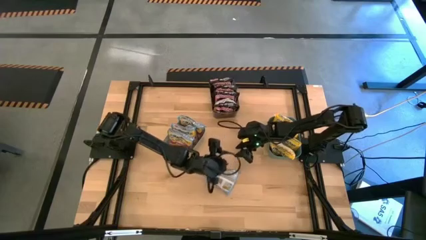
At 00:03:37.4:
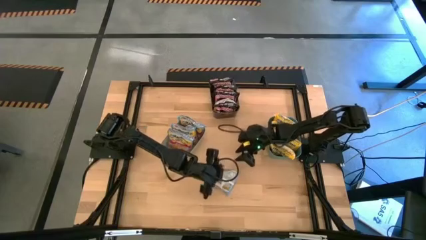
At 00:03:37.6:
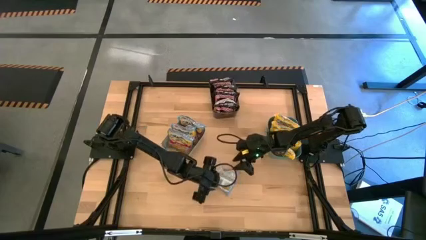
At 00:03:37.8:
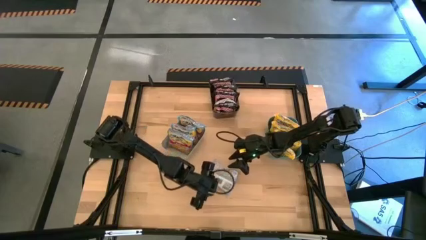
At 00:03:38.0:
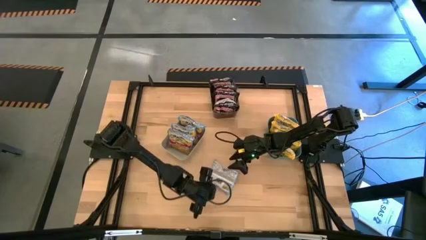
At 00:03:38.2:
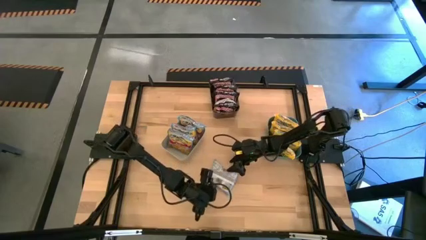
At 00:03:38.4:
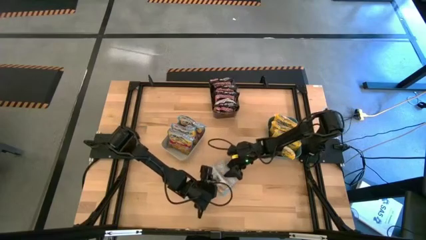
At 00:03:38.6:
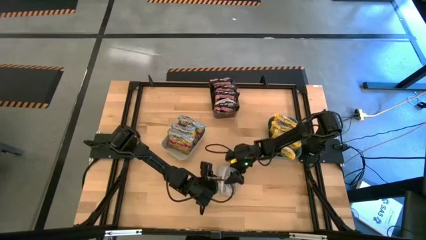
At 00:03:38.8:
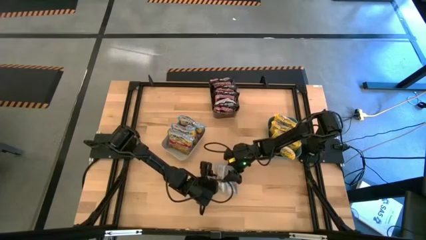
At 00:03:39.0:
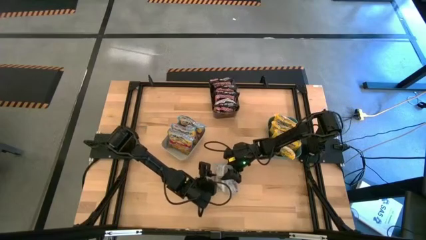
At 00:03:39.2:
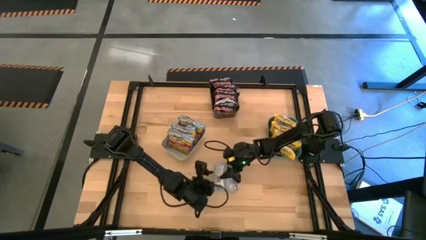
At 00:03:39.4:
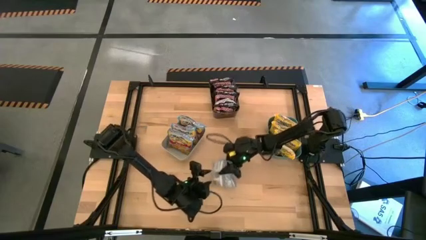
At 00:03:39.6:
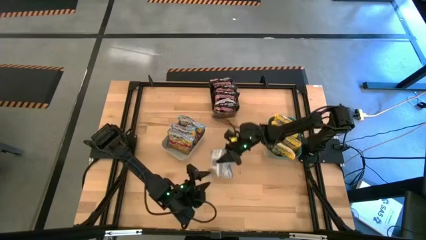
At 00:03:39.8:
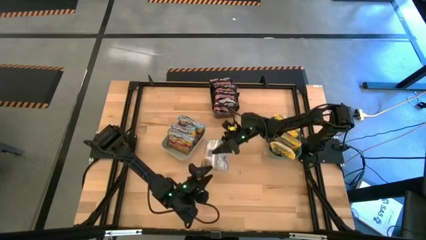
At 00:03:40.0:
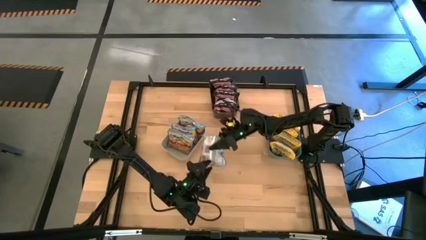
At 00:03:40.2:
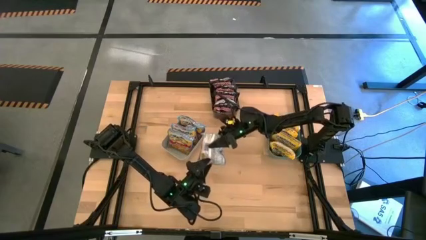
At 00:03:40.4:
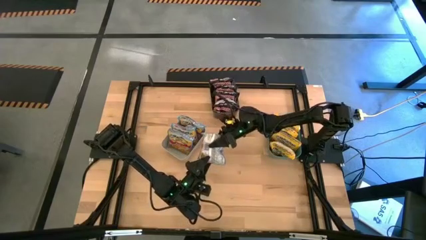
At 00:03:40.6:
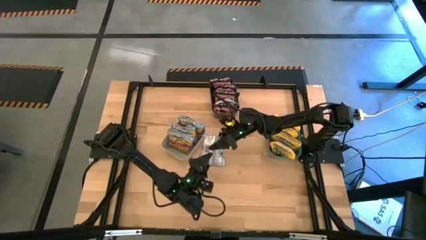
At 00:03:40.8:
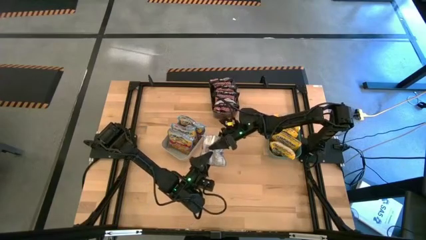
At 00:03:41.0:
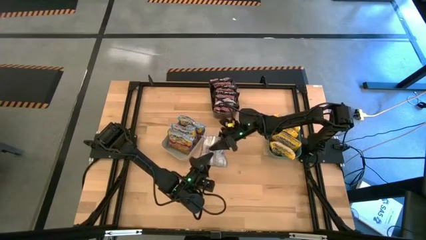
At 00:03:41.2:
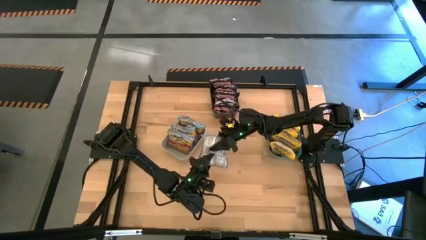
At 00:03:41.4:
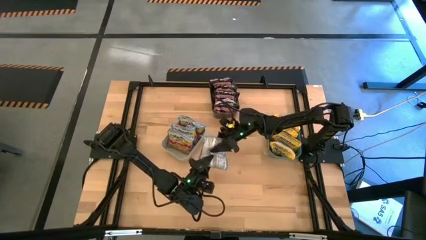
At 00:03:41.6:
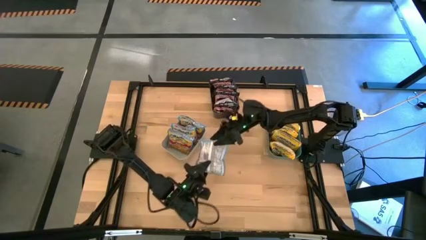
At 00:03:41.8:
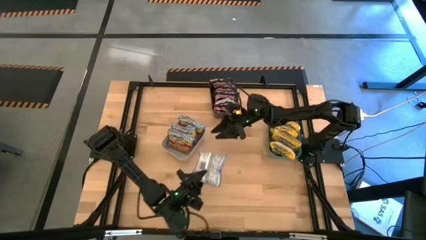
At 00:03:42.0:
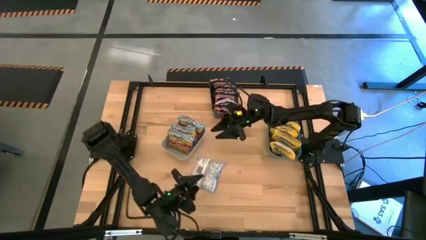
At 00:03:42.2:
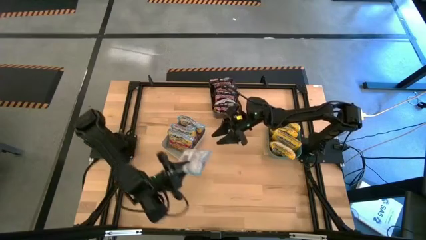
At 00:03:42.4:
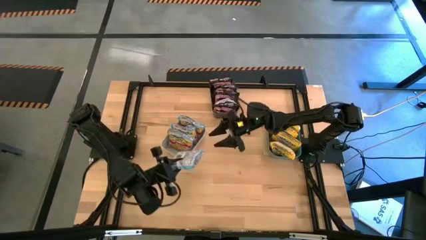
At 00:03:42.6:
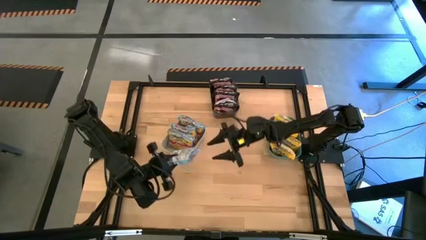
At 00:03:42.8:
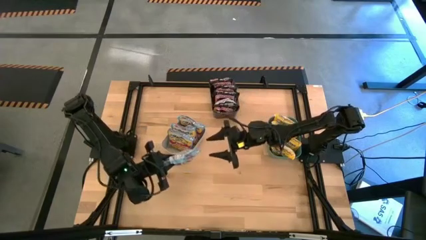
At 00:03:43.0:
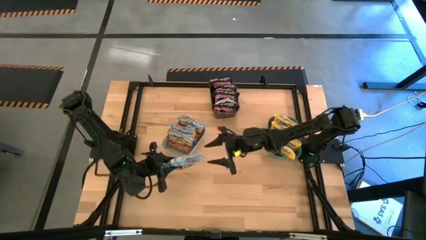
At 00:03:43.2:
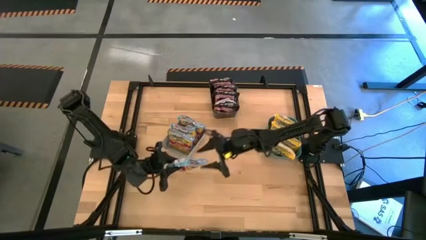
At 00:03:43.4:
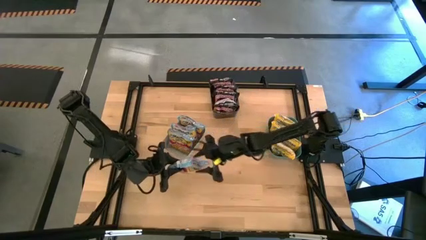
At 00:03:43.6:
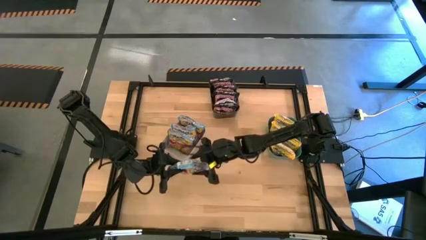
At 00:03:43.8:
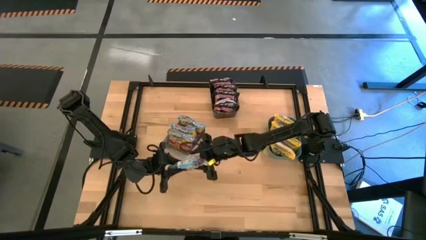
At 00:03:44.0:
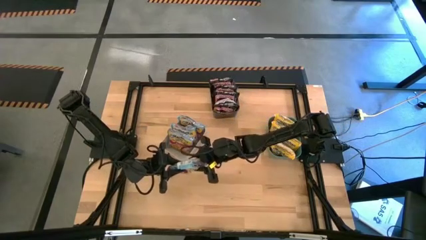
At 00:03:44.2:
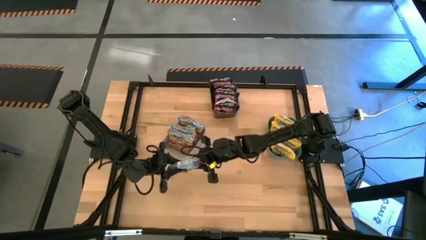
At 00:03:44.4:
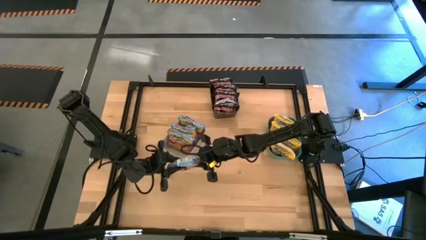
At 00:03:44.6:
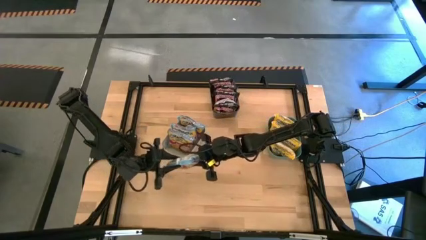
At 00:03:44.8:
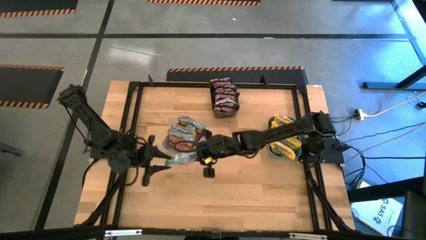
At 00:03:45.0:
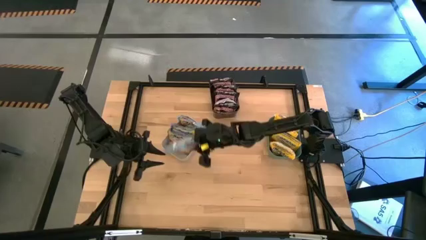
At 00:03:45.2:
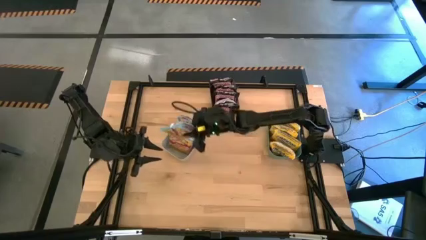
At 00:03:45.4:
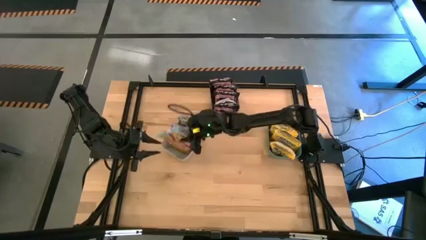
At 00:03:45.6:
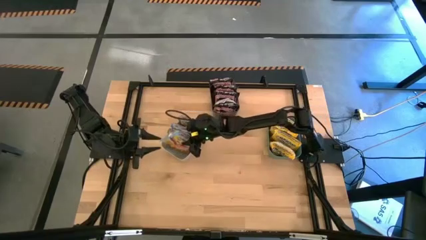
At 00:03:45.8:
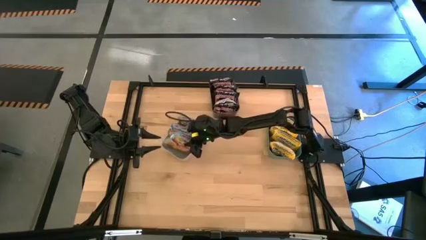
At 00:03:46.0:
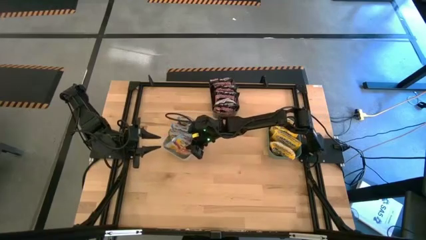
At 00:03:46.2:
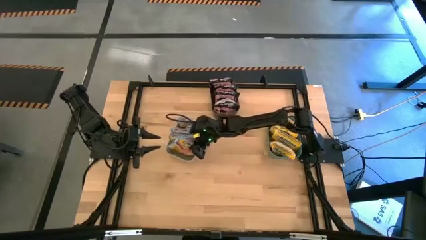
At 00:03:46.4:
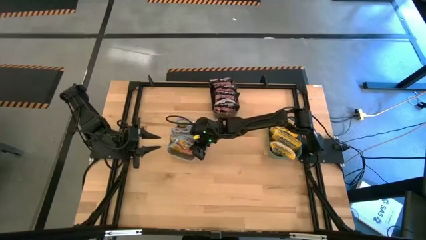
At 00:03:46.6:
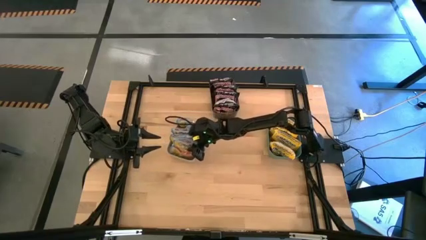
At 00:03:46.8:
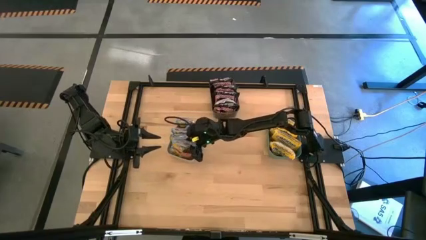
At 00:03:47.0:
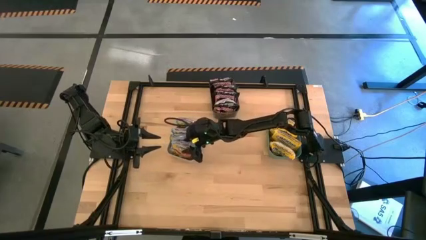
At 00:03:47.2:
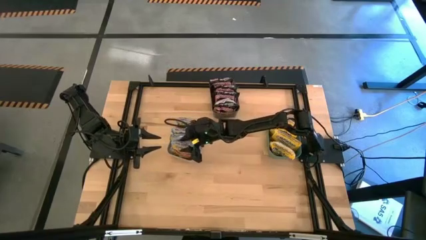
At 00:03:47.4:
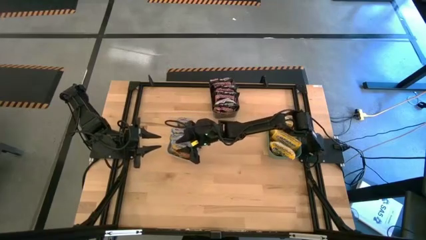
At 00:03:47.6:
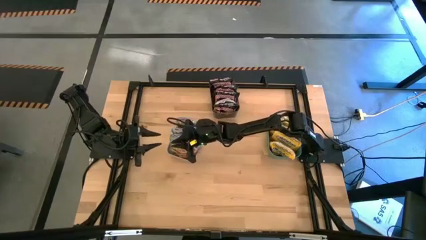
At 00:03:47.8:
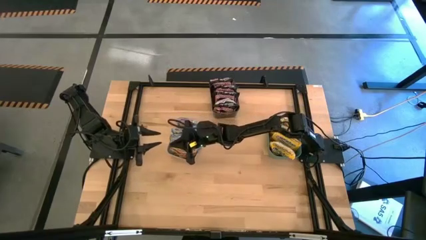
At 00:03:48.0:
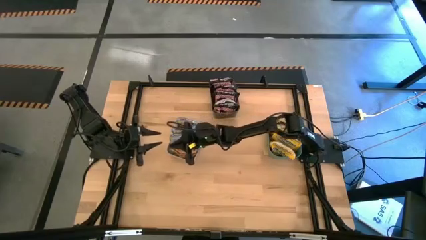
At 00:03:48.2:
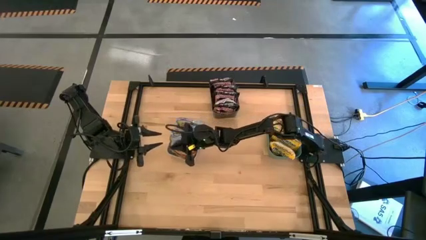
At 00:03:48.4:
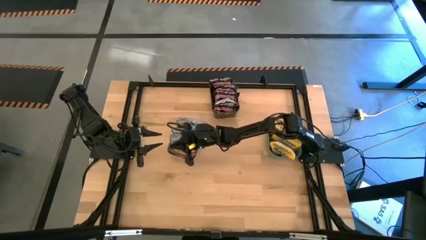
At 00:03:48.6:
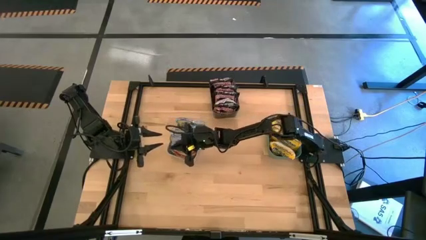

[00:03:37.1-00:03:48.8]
Task: Sort Maruchan noodles
Put the blue noodle pack into the gray bin

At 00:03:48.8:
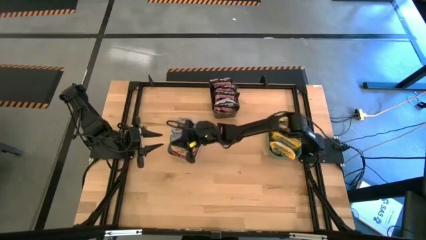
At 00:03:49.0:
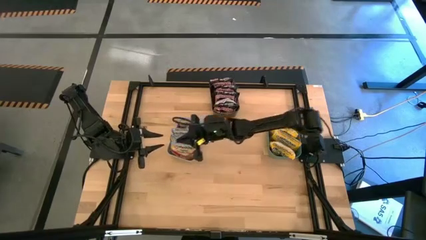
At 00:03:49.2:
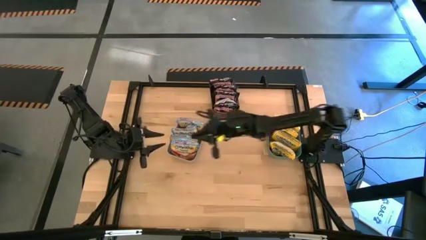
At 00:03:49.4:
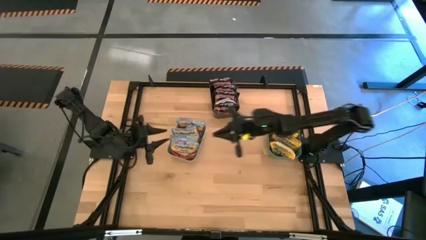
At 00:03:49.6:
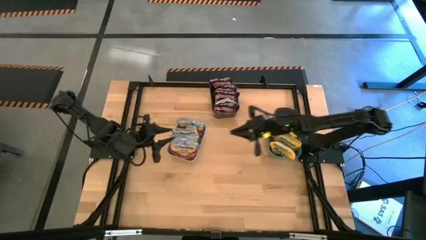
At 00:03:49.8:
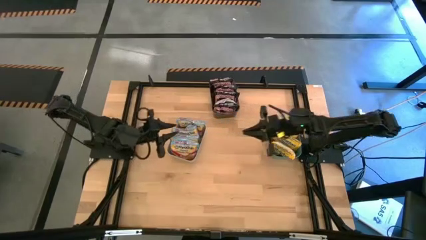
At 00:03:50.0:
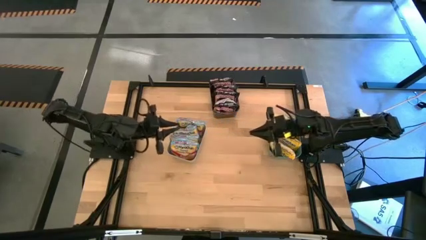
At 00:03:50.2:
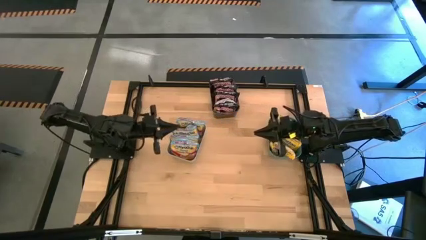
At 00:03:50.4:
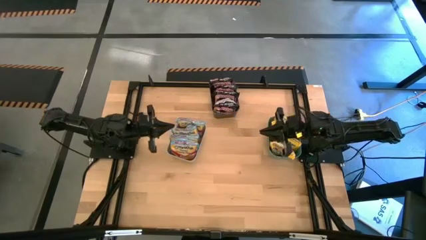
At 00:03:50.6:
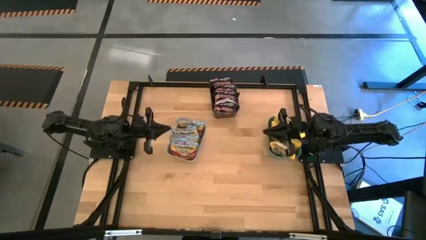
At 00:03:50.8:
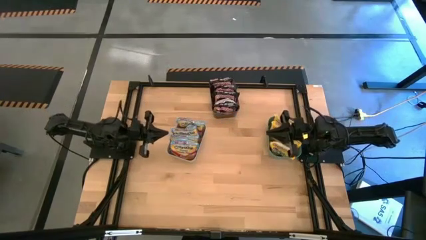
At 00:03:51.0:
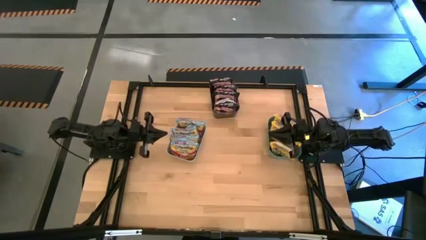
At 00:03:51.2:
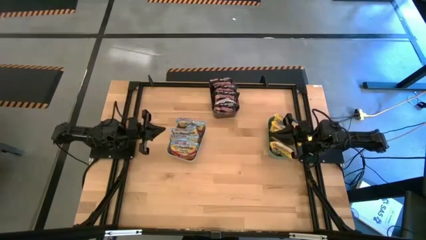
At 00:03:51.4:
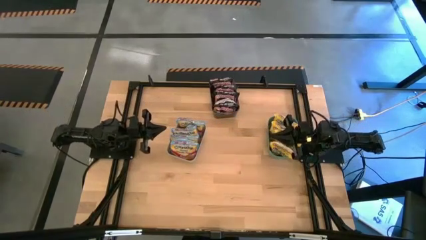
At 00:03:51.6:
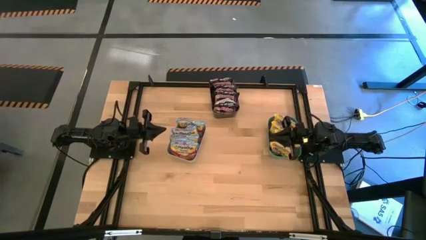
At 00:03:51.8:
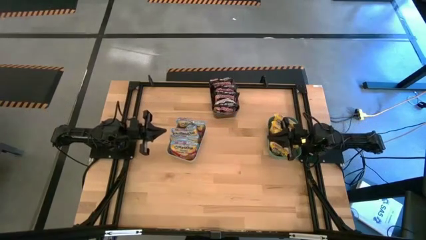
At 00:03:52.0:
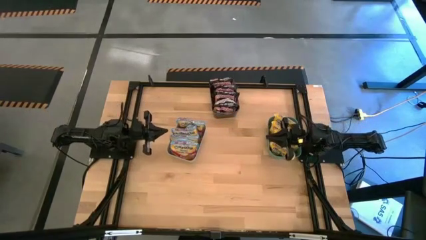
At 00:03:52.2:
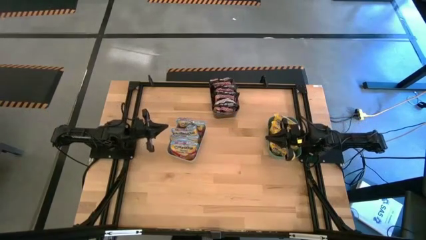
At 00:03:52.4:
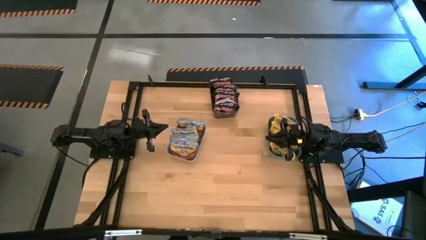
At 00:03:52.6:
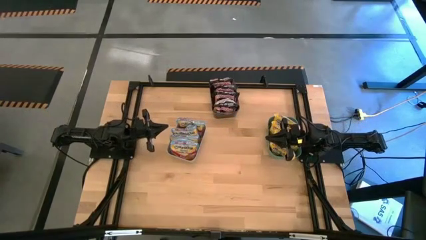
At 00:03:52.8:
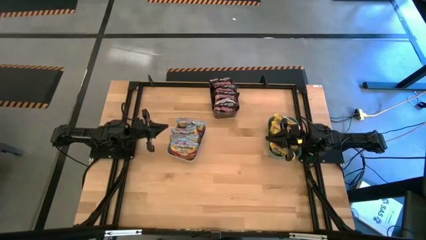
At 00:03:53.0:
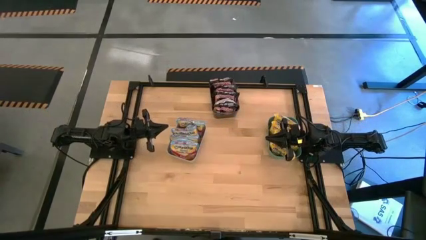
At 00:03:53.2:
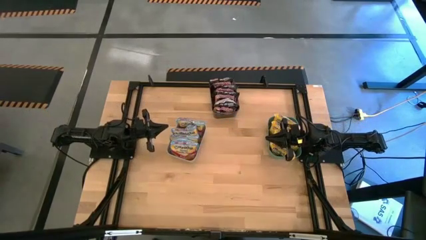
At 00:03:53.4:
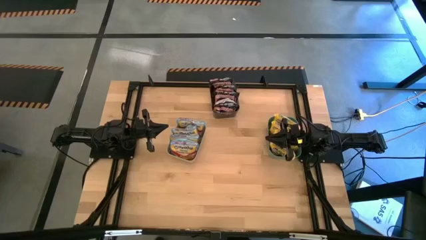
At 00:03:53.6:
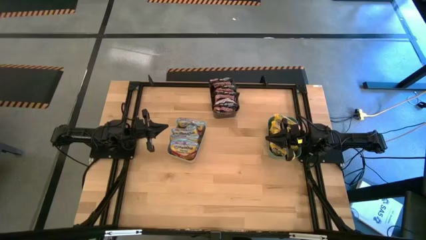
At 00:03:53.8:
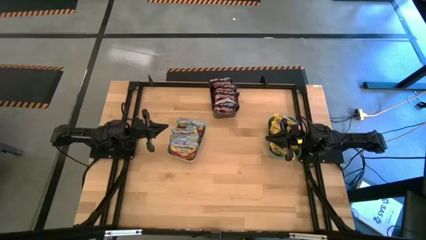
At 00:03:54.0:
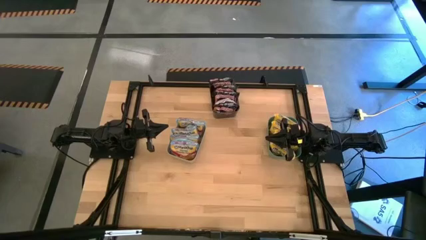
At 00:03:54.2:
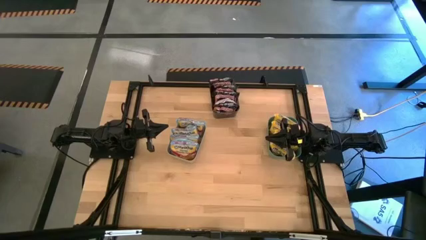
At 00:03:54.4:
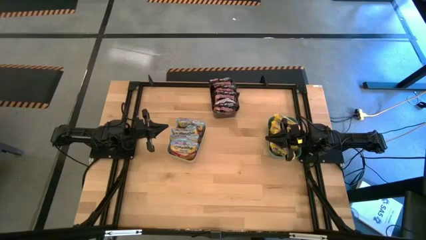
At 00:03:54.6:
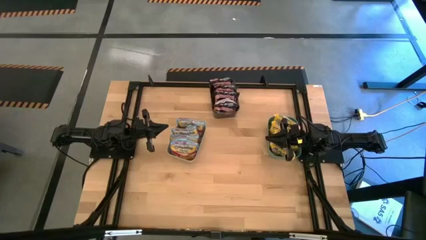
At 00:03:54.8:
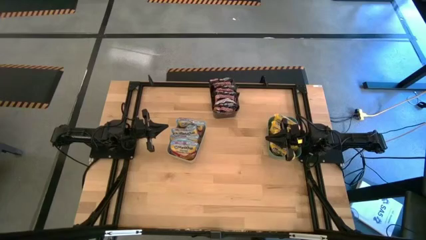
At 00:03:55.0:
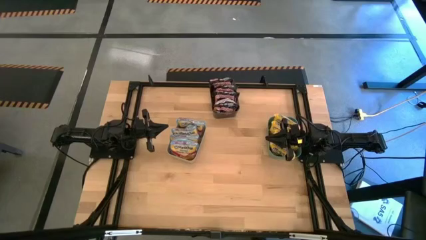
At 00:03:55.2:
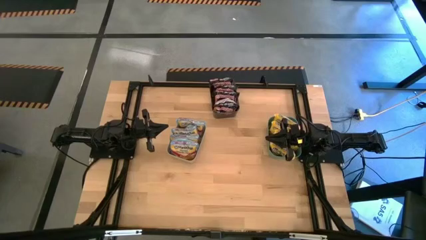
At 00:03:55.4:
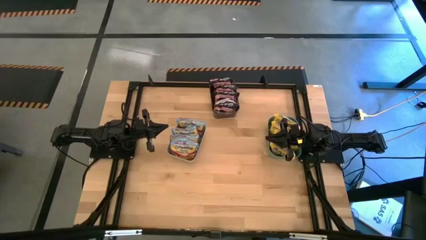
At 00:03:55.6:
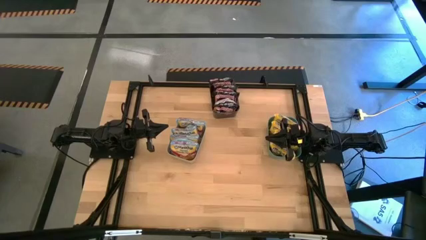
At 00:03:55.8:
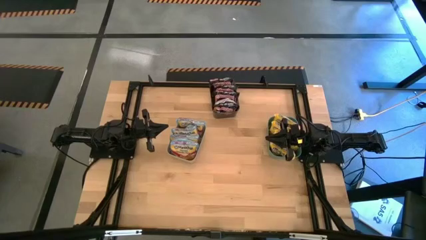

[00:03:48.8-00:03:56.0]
Return to Home Position
